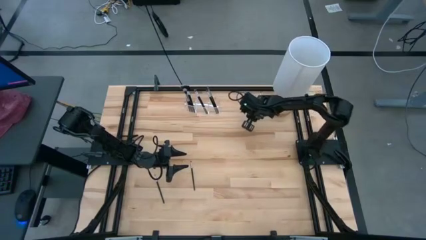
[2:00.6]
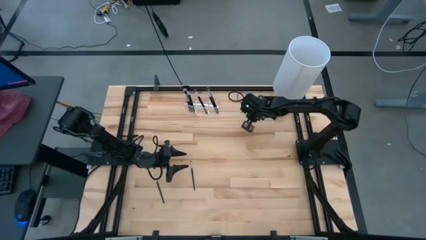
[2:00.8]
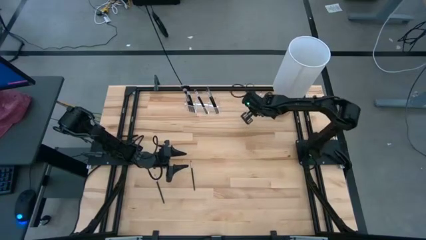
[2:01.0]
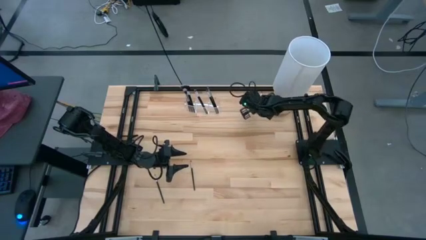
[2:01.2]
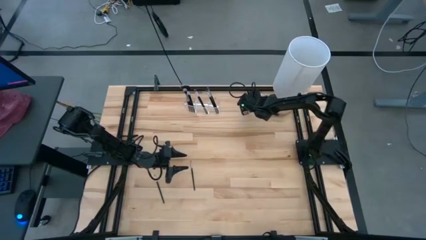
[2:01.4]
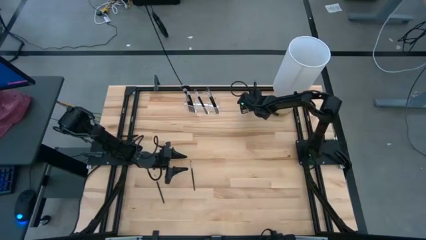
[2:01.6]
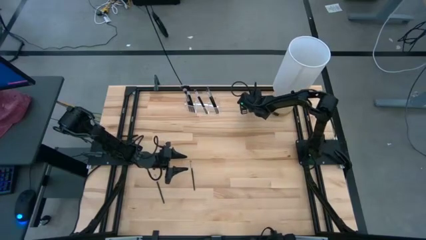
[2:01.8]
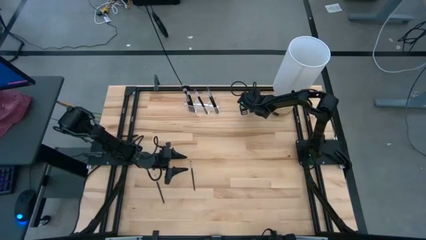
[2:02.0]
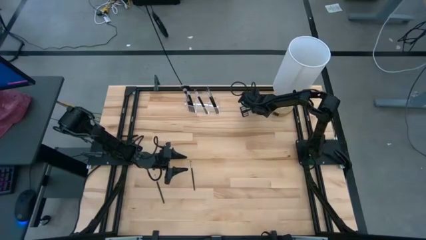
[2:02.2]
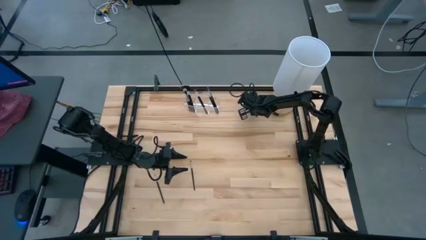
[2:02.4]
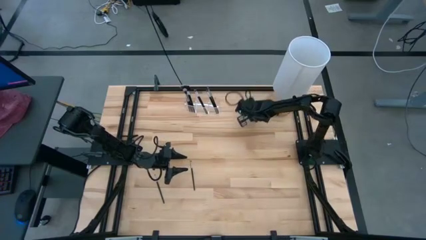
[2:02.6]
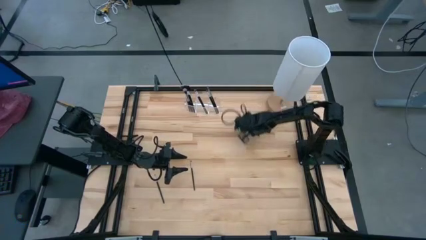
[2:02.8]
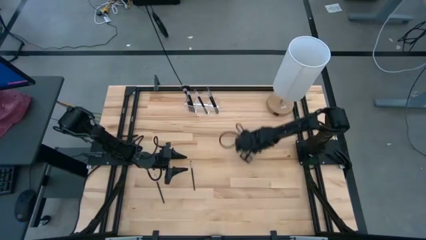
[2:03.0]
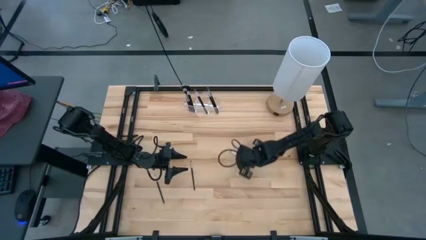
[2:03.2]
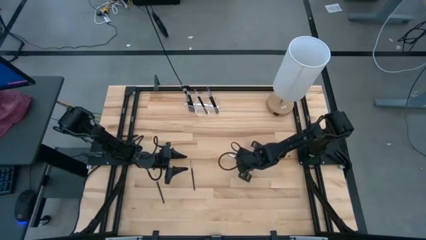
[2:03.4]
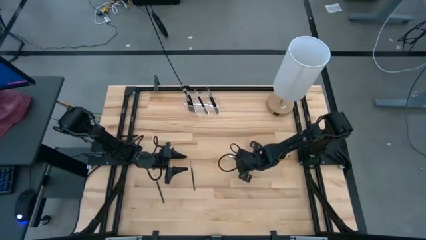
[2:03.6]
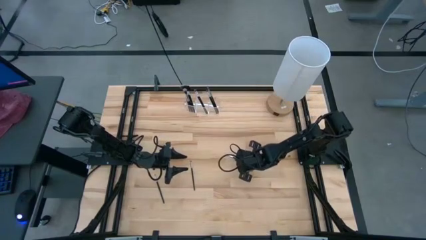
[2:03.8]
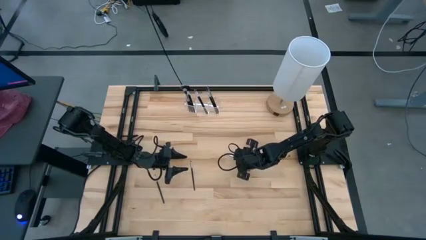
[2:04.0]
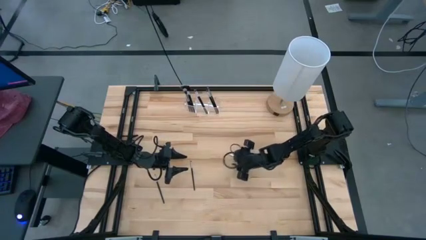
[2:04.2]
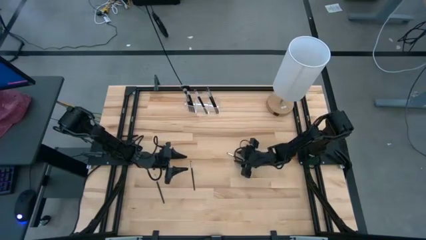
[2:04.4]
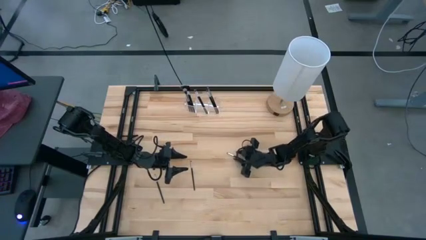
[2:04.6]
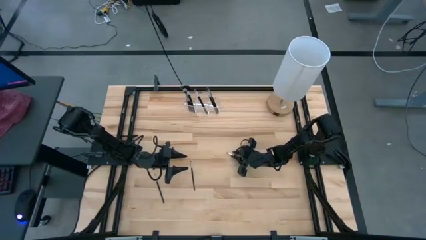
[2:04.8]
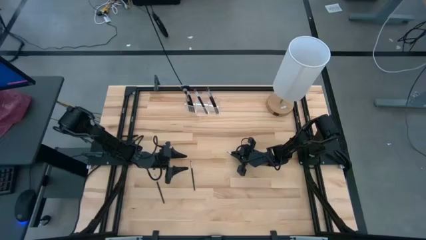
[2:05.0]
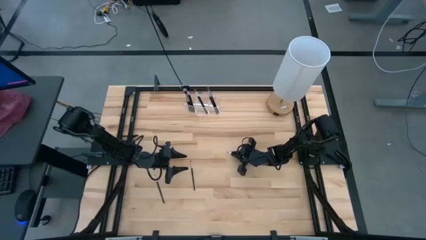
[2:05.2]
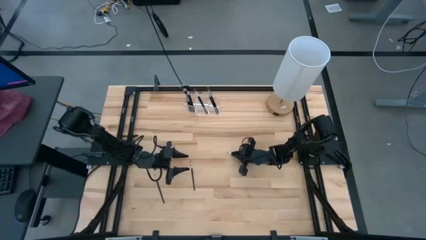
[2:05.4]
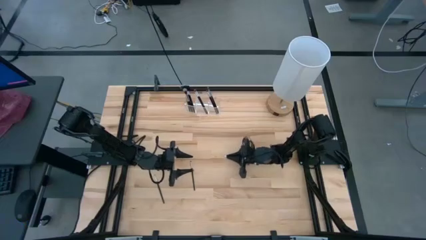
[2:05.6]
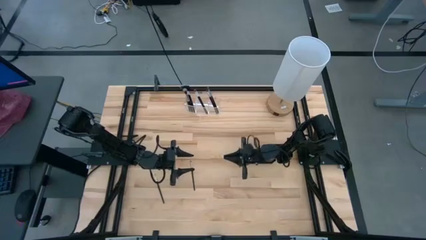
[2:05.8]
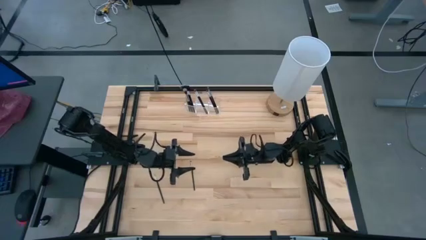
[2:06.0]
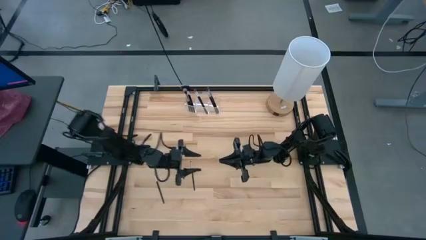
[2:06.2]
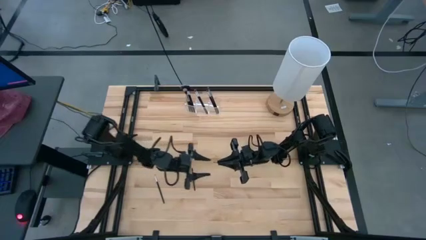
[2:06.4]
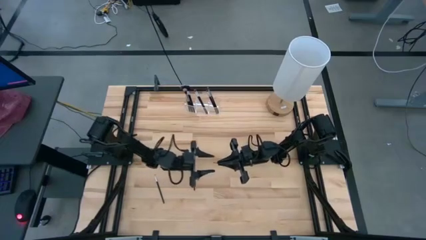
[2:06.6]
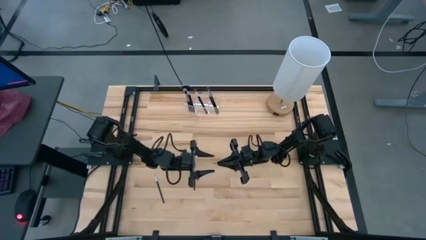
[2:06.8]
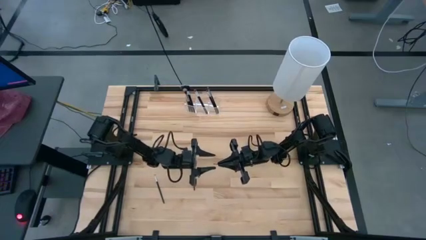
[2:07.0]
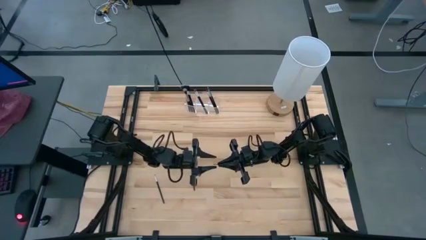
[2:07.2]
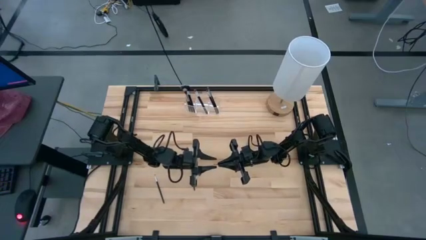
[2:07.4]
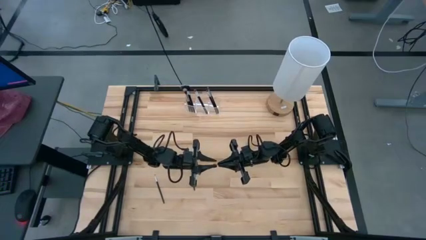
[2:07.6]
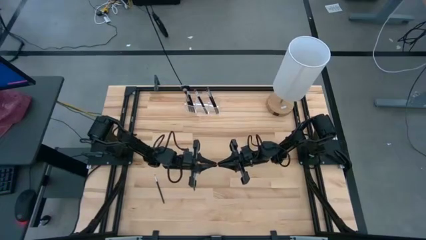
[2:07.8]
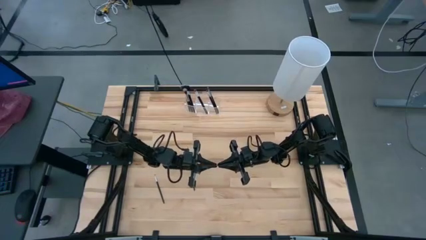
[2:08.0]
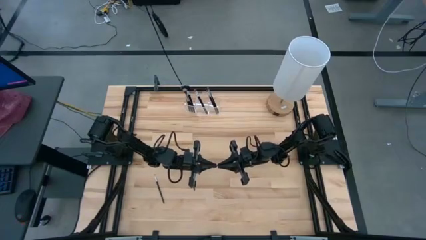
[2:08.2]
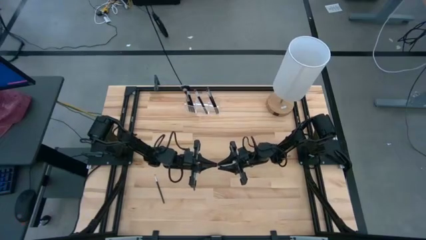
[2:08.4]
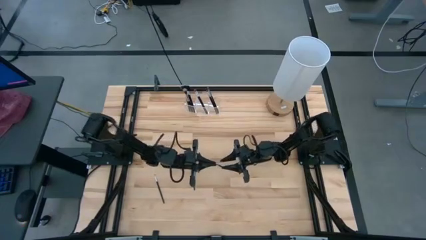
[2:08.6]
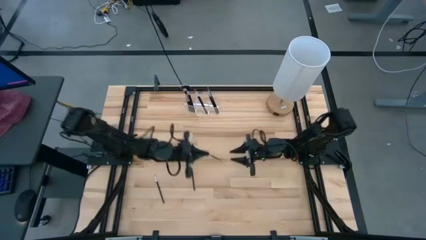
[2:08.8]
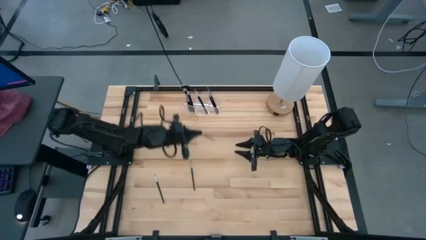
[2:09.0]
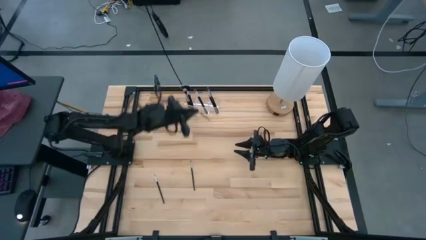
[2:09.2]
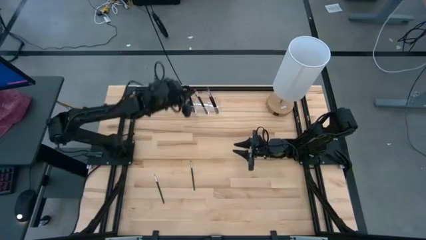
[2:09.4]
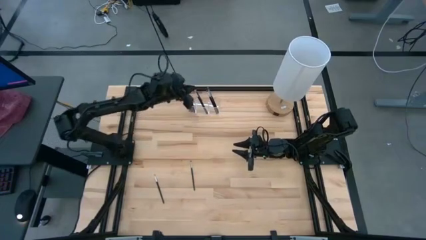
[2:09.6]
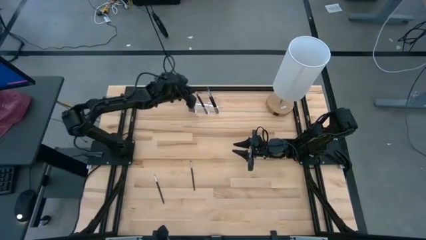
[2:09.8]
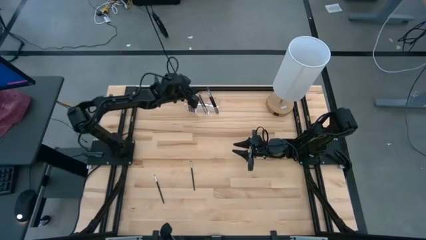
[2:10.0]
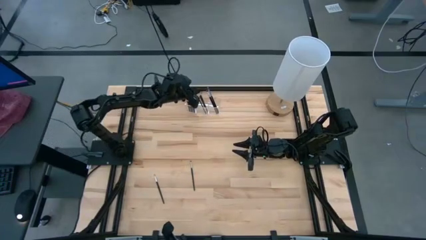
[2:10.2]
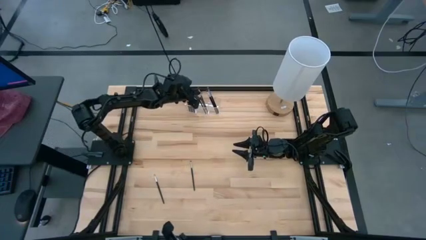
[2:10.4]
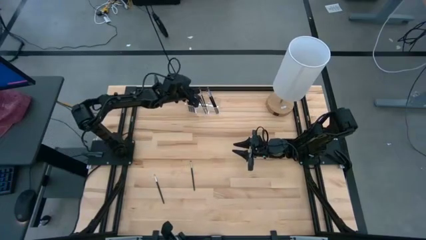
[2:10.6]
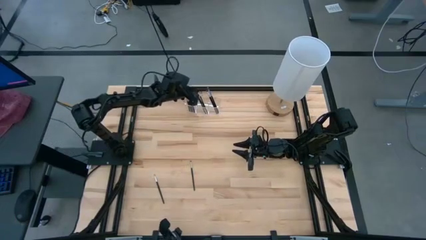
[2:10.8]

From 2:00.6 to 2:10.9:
Task: Put items in baskets/containers
Put the black eyeshadow brush into the transparent organizer

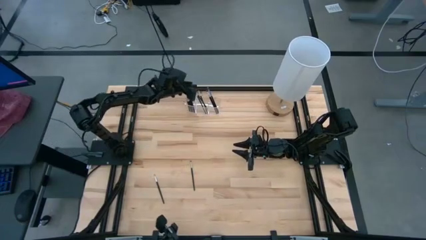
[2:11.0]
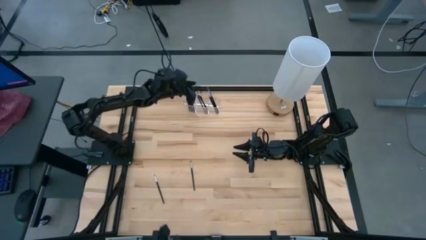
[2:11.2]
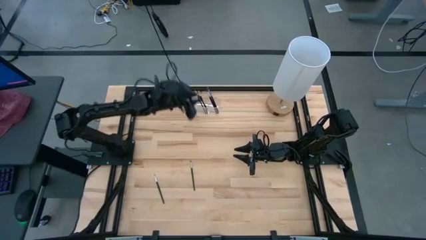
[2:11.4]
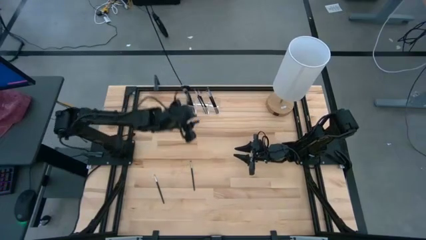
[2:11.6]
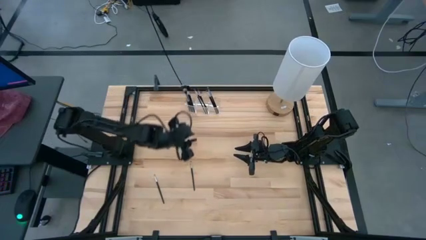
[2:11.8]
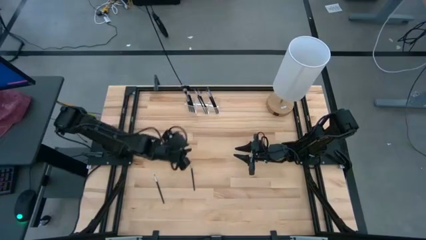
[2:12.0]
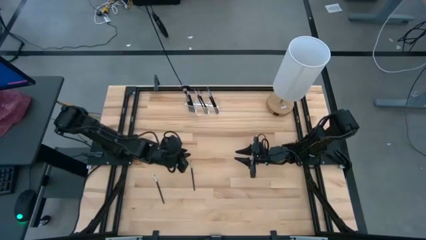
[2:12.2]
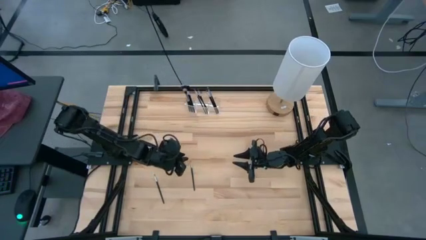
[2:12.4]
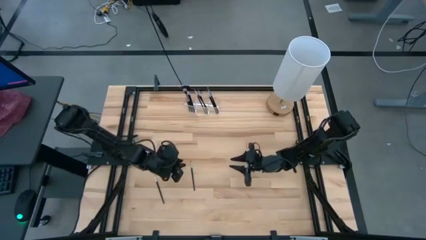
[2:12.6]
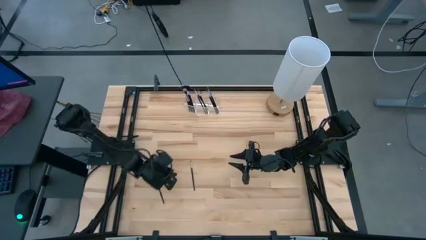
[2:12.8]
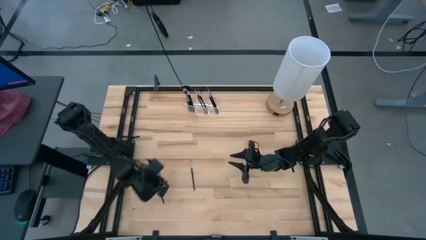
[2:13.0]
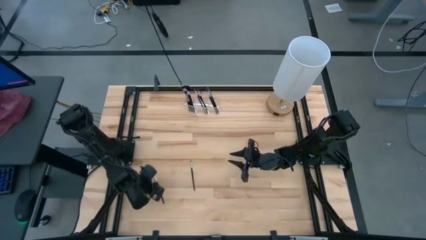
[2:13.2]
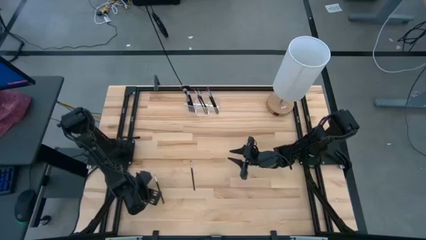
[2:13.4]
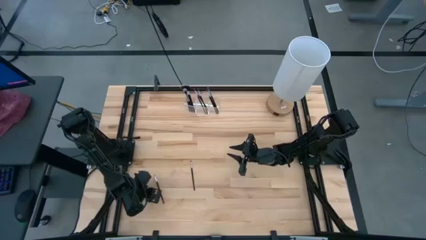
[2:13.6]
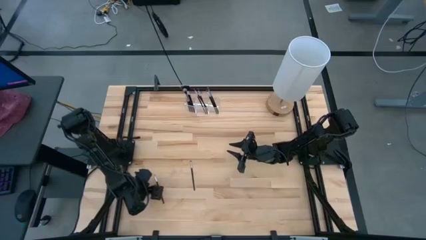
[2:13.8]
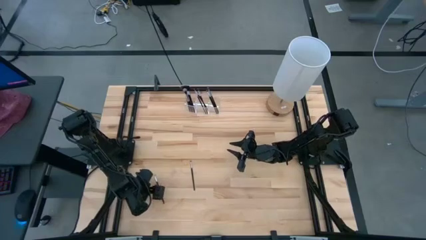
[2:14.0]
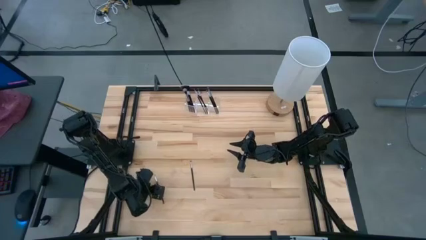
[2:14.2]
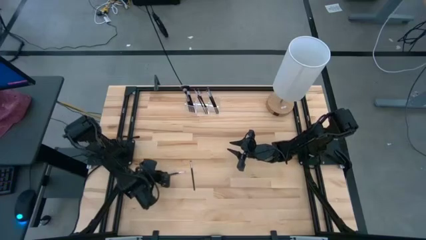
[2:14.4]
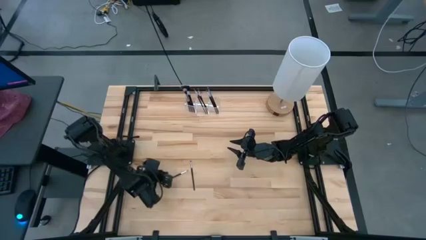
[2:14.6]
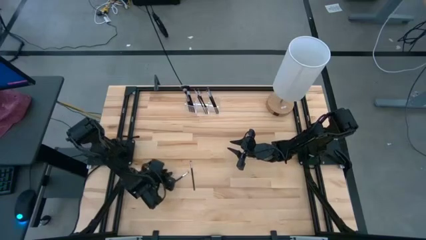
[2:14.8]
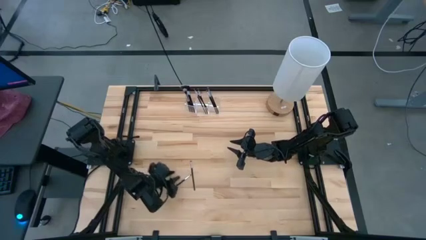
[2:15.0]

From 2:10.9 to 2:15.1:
Put the black eyeshadow brush into the transparent organizer

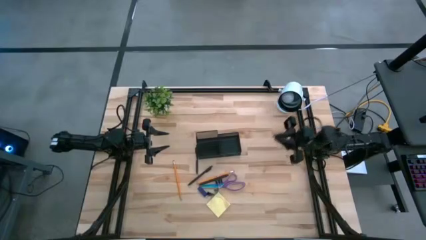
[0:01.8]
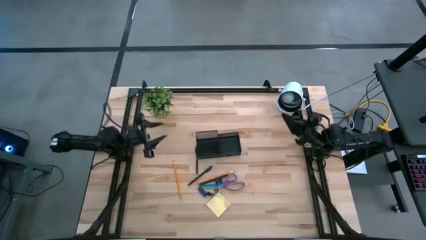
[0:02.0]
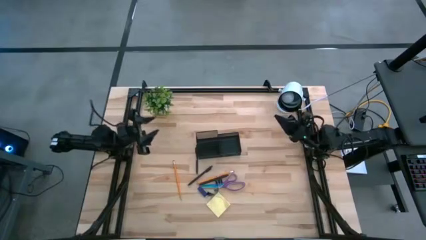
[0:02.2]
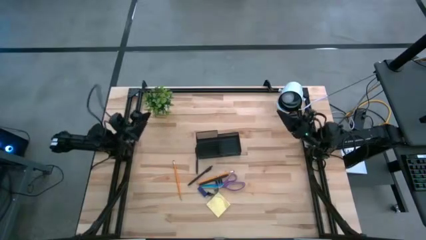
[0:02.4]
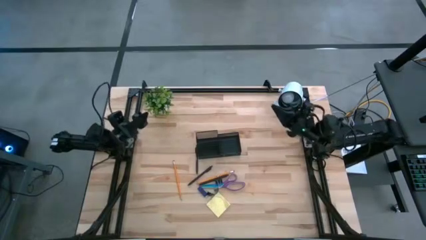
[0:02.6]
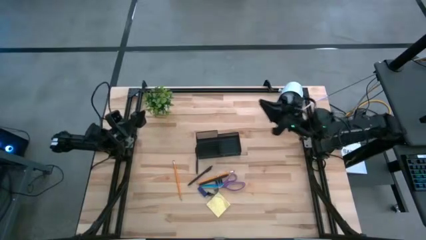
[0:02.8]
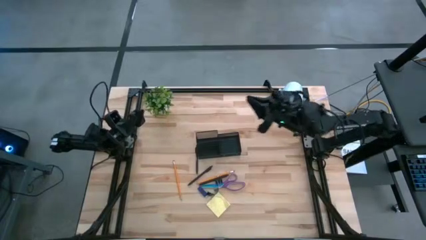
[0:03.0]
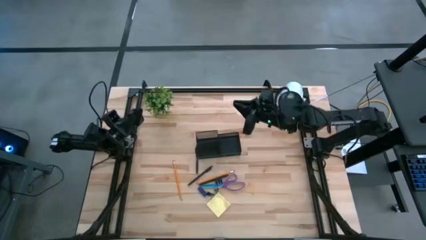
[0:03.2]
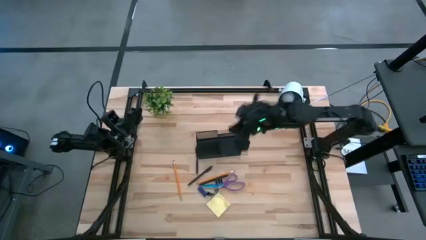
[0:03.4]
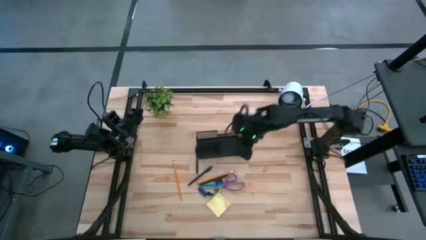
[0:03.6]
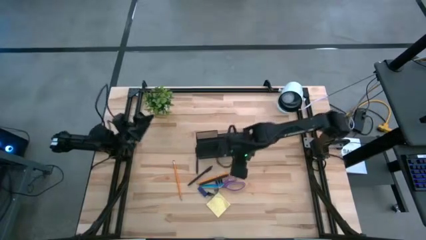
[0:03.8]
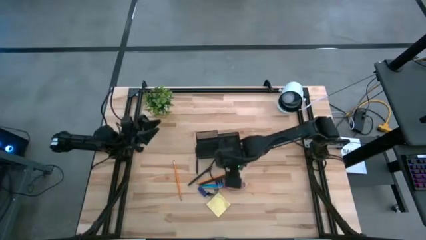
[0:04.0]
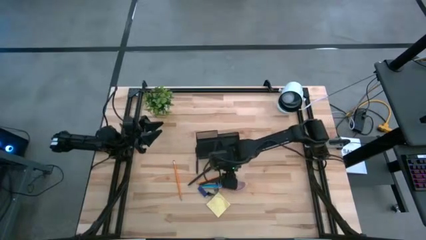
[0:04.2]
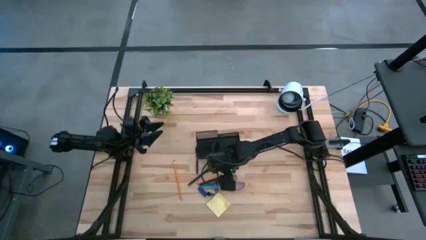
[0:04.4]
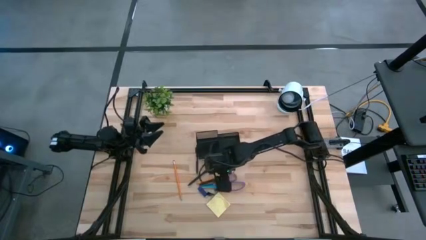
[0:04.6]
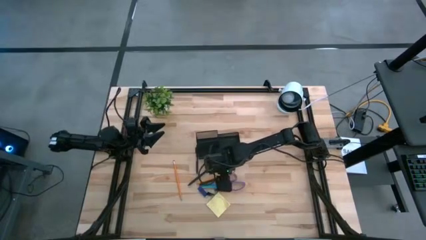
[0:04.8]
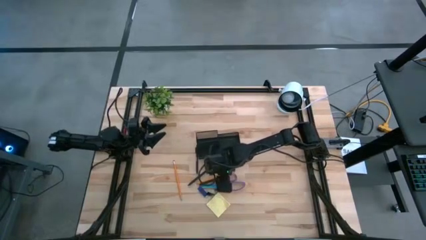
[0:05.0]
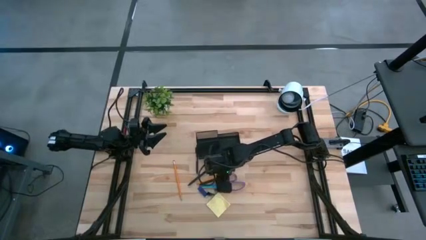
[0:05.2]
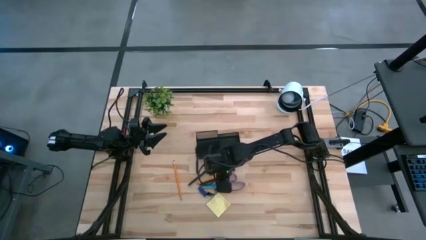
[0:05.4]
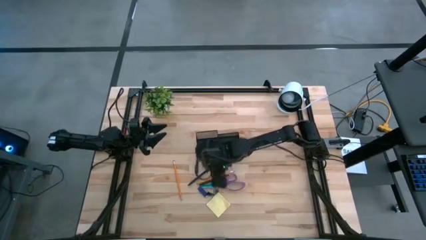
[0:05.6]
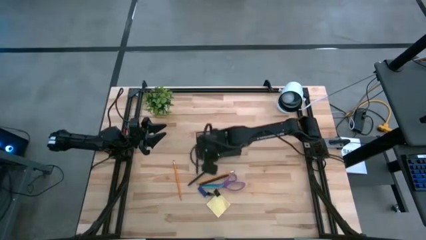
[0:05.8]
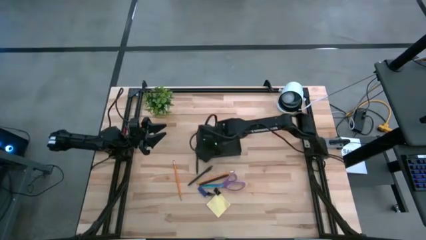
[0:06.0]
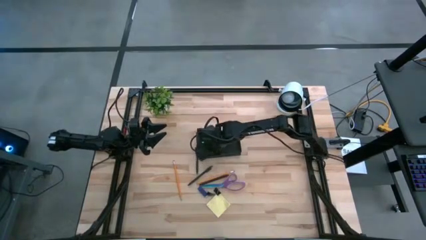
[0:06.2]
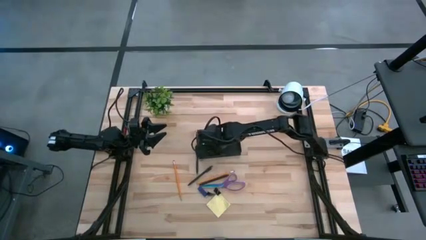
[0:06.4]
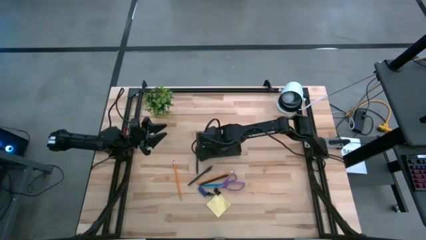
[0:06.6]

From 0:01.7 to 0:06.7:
Task: Pick and place office supplies into organizer
Put the top black binder clip into the black desk organizer
